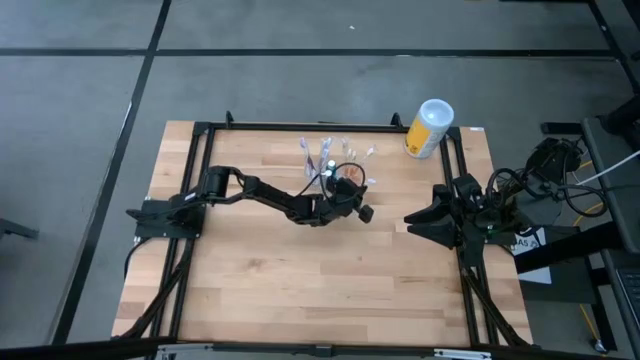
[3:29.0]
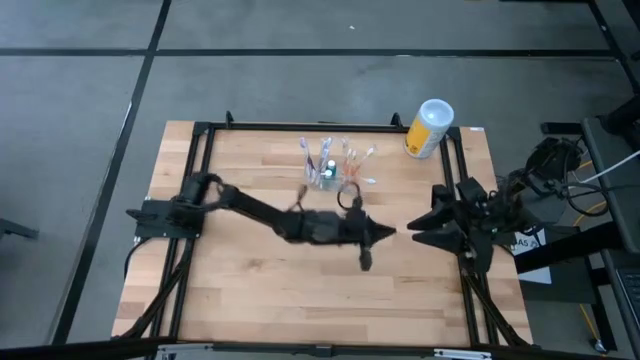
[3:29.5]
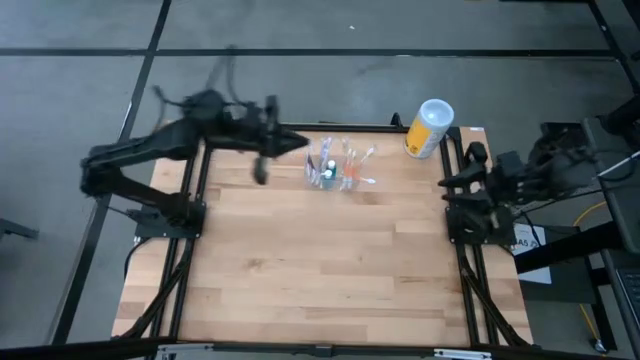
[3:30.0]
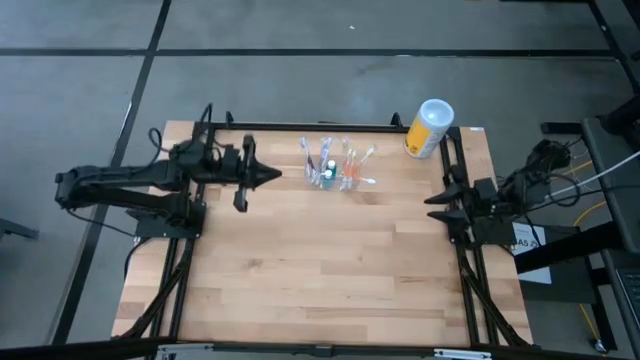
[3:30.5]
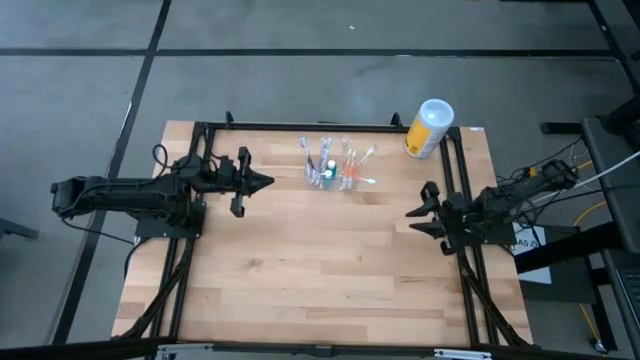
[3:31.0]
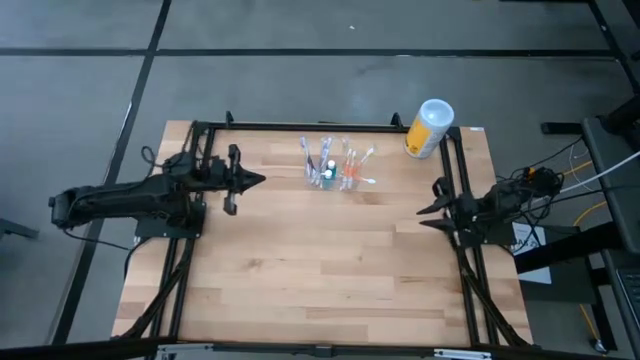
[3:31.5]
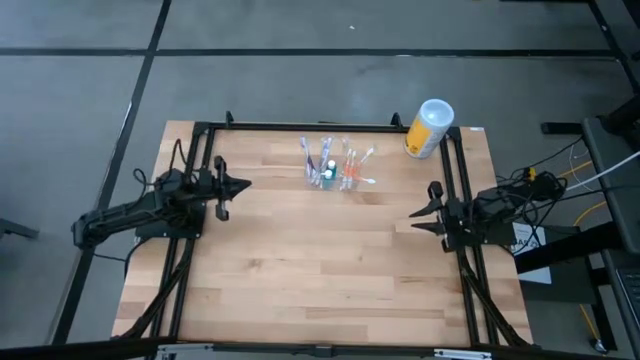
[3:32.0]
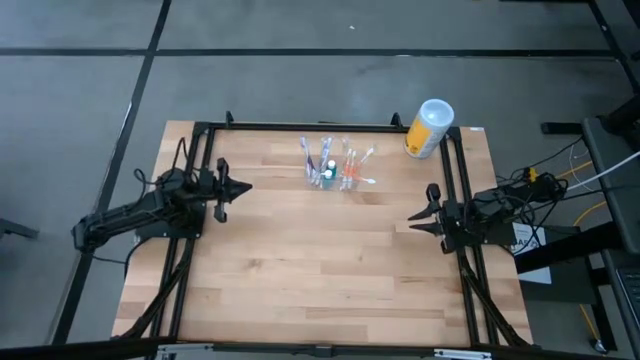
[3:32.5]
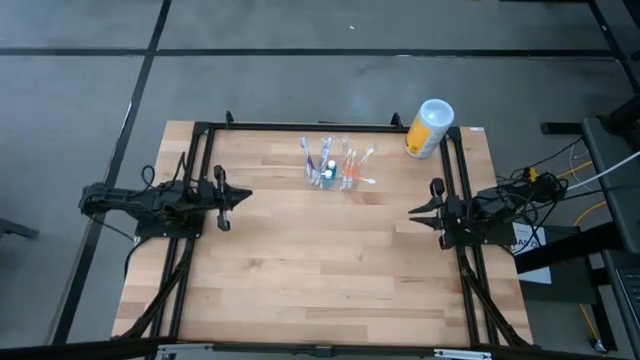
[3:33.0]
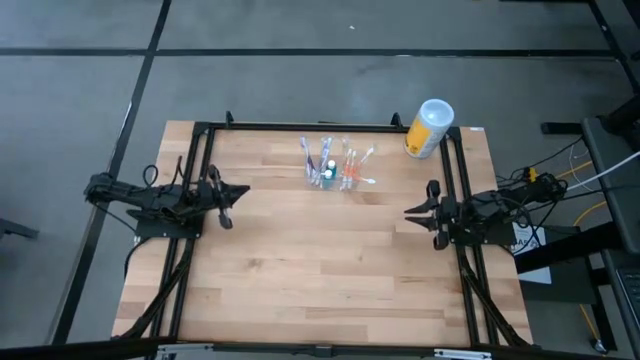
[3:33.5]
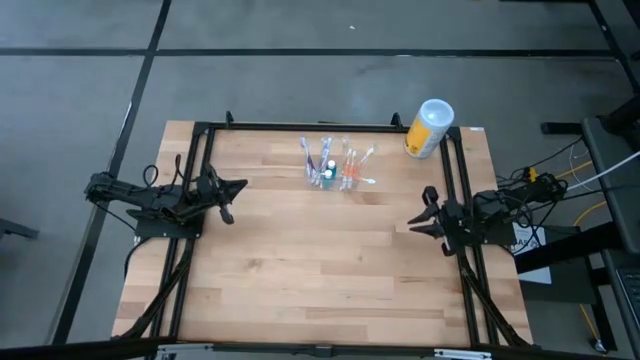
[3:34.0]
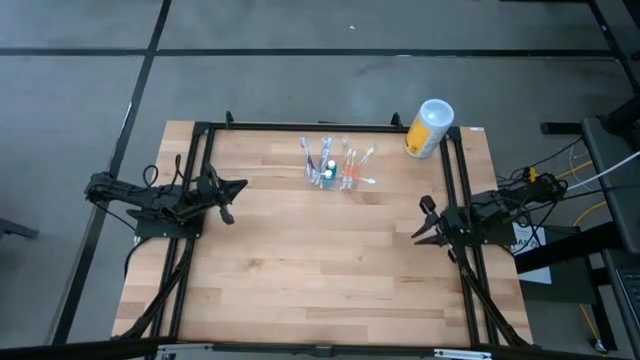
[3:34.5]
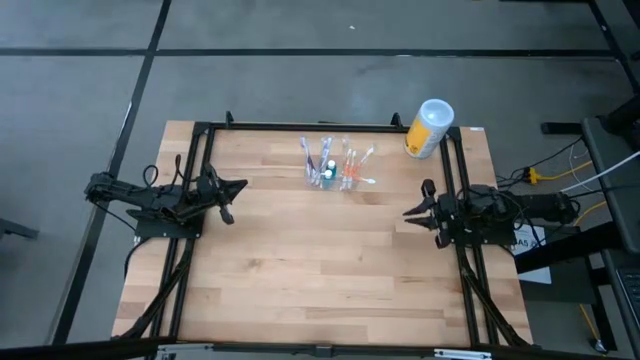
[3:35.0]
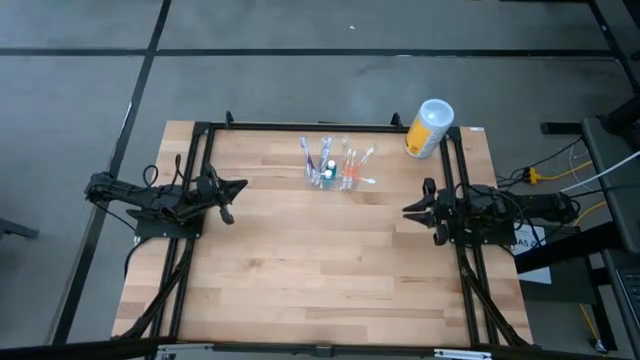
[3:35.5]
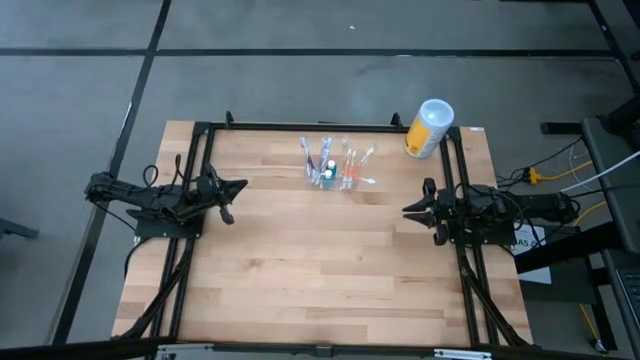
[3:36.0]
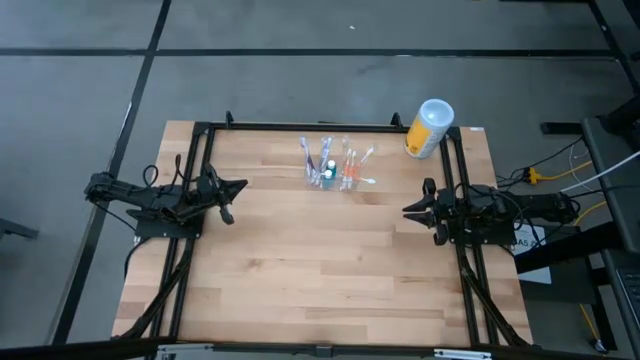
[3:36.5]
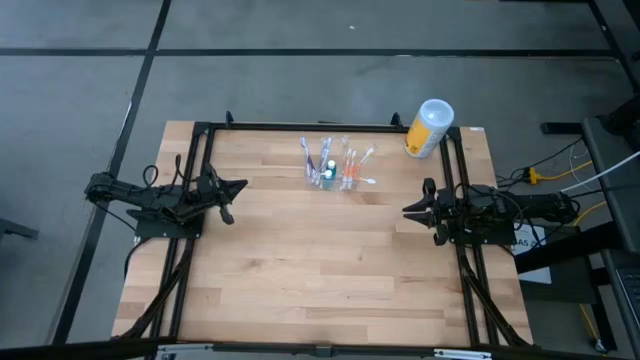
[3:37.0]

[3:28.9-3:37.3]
Task: Pick & Place toothbrushing station
Return to Home Position

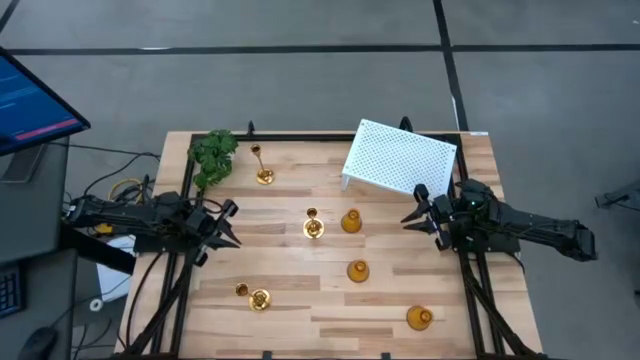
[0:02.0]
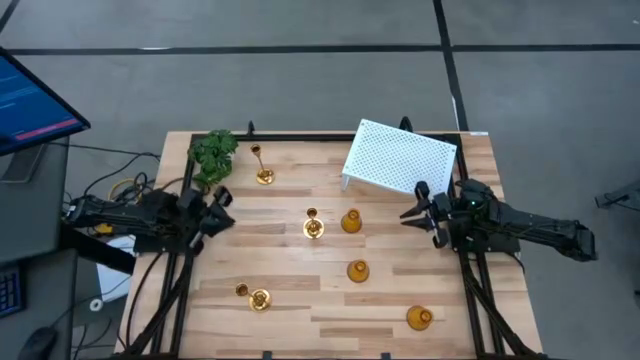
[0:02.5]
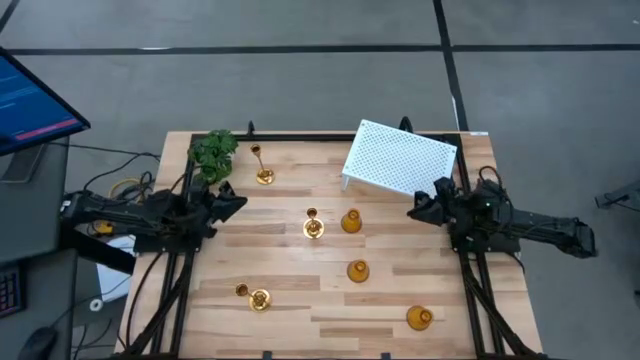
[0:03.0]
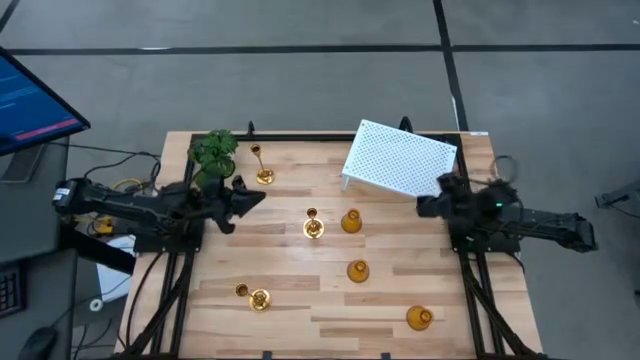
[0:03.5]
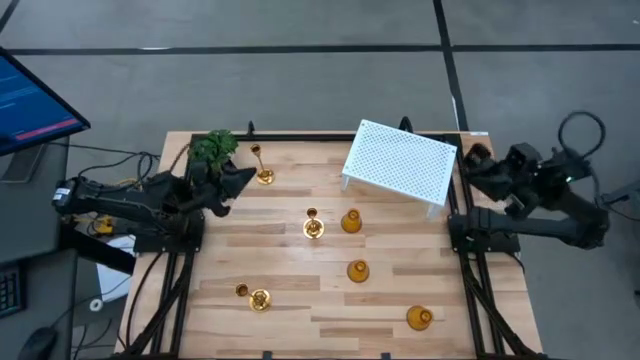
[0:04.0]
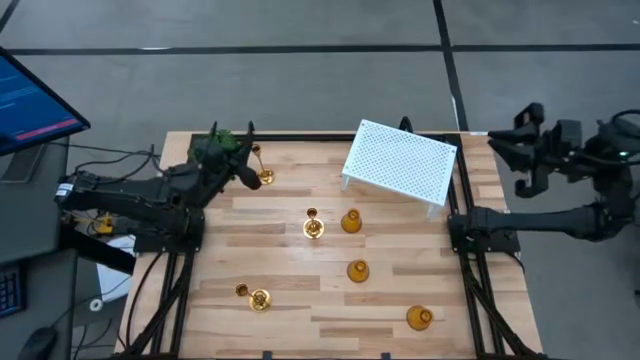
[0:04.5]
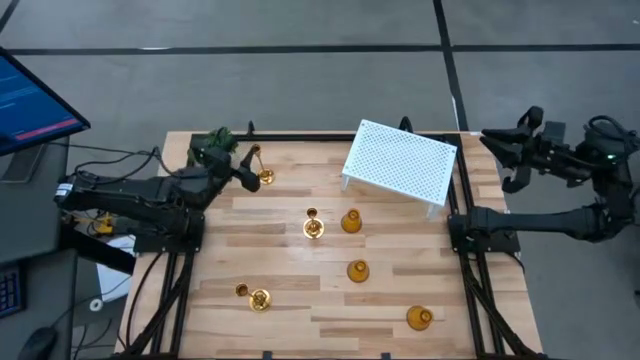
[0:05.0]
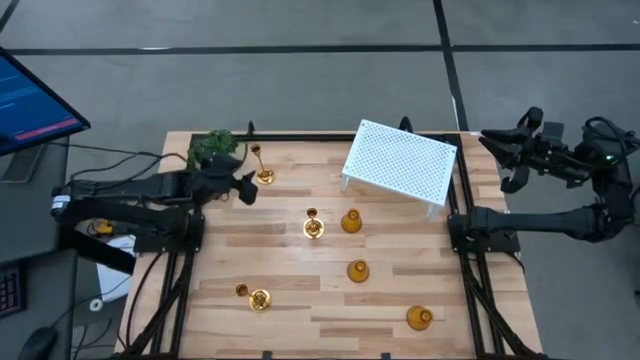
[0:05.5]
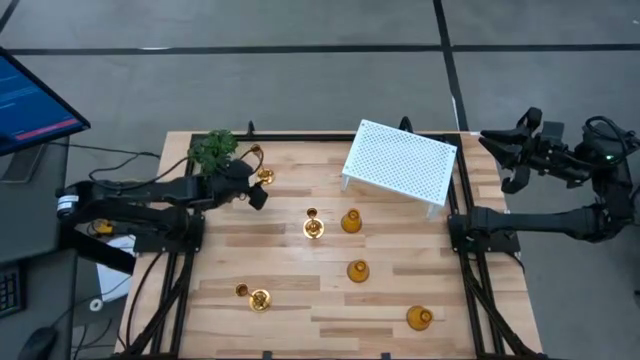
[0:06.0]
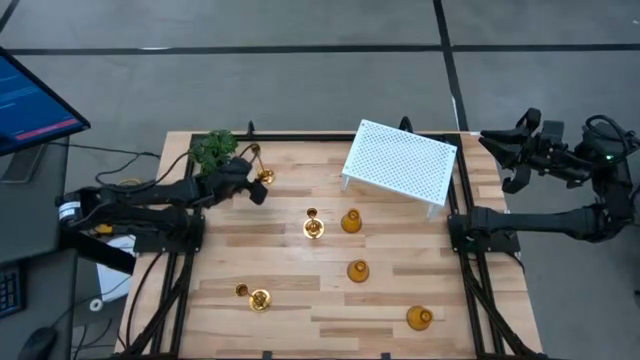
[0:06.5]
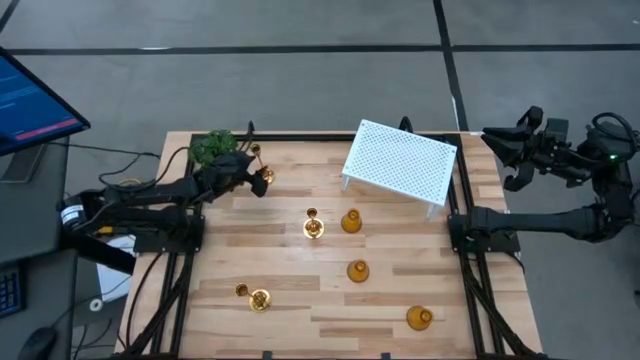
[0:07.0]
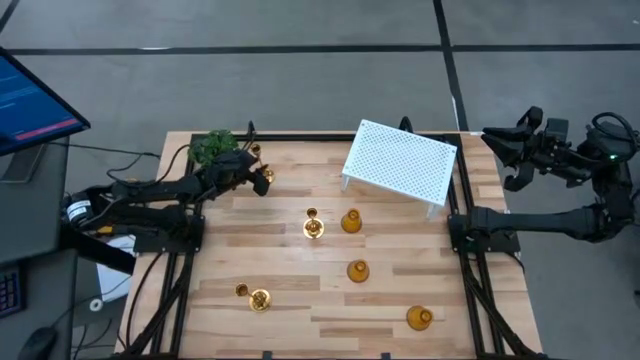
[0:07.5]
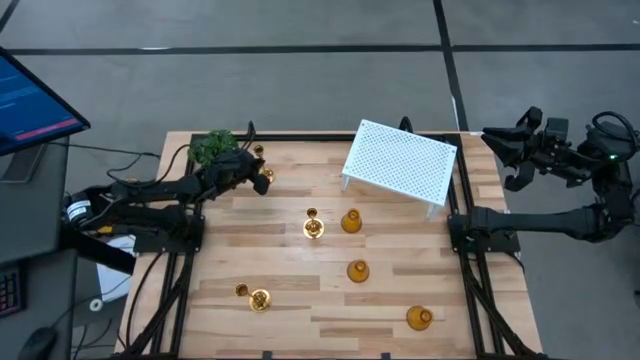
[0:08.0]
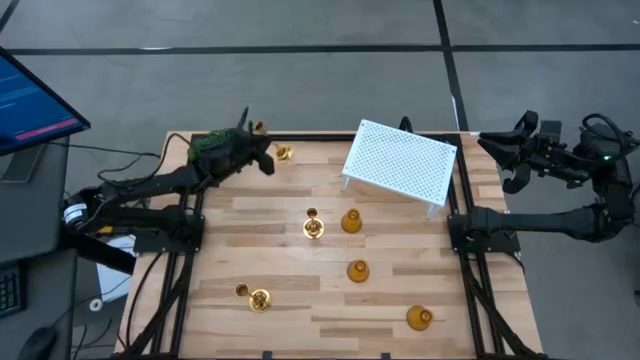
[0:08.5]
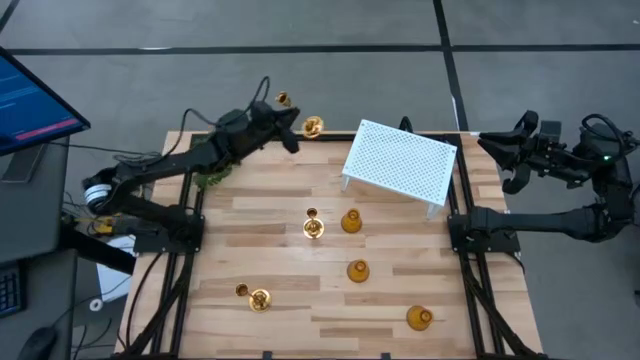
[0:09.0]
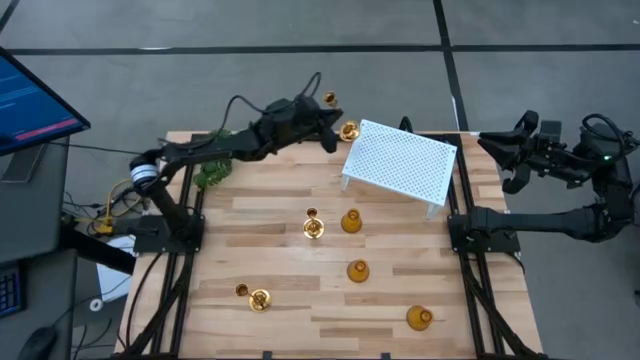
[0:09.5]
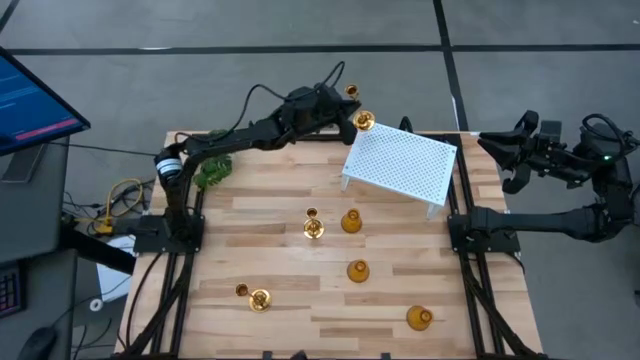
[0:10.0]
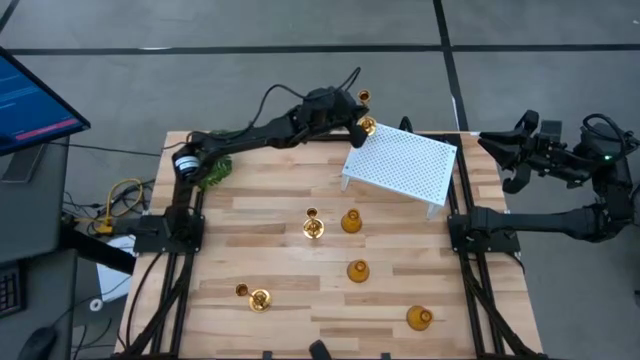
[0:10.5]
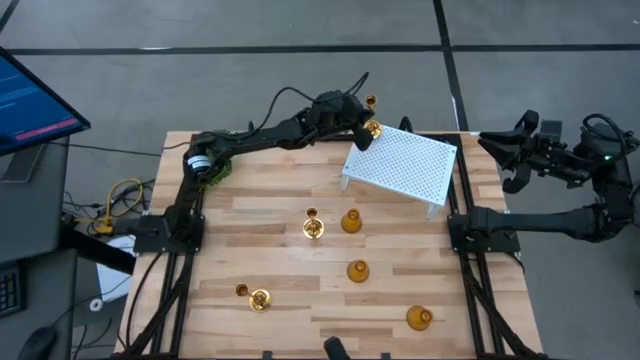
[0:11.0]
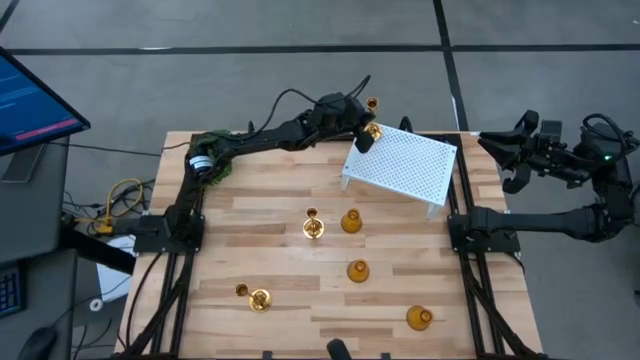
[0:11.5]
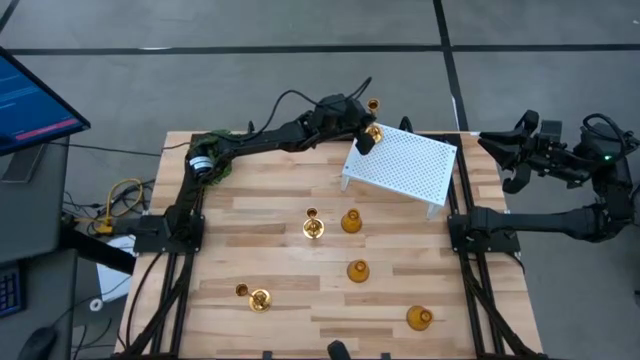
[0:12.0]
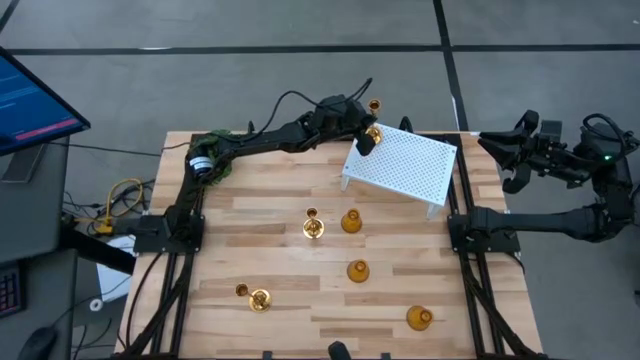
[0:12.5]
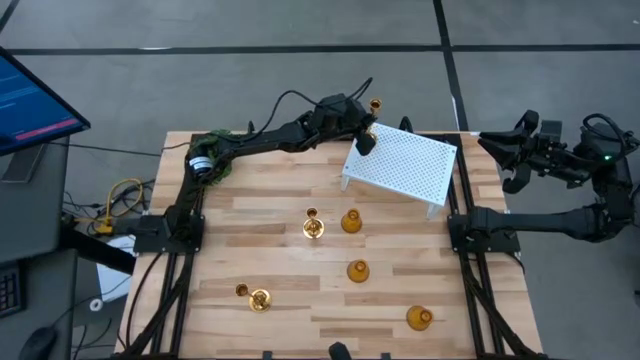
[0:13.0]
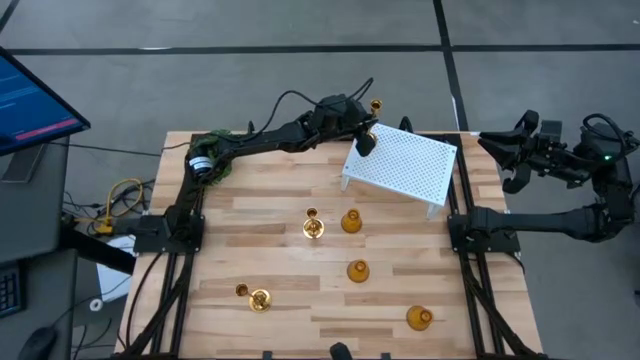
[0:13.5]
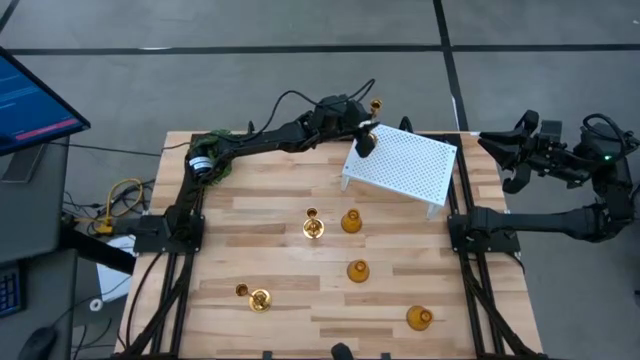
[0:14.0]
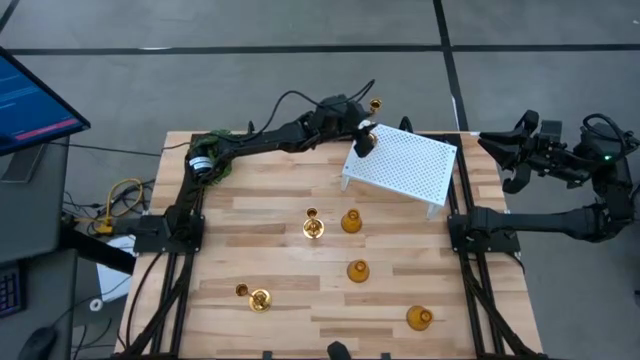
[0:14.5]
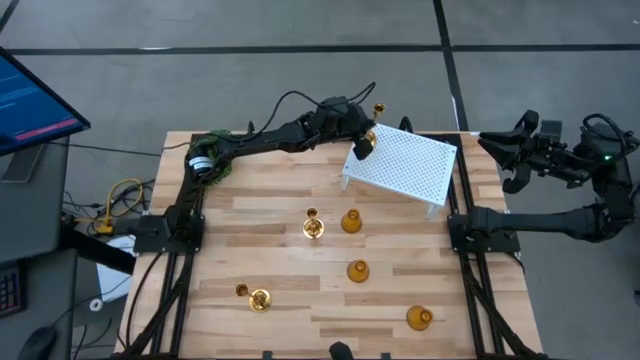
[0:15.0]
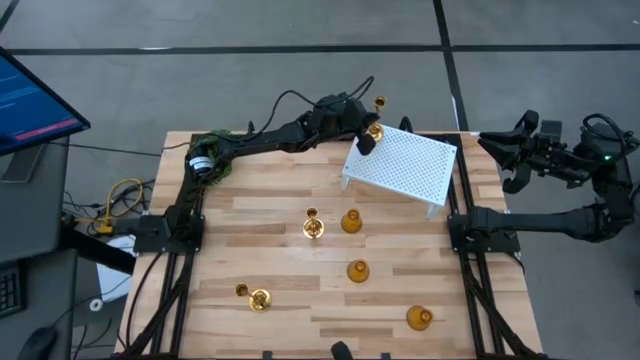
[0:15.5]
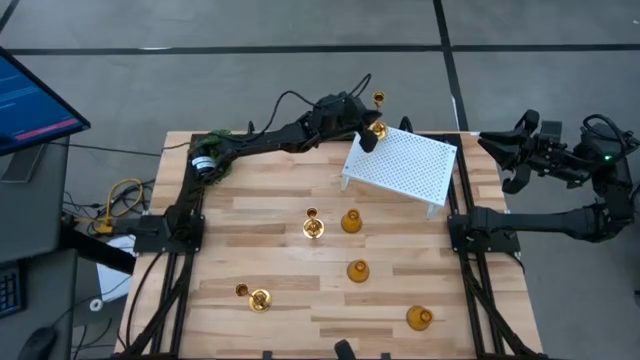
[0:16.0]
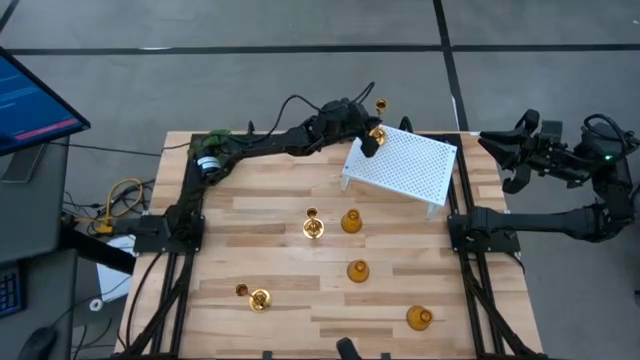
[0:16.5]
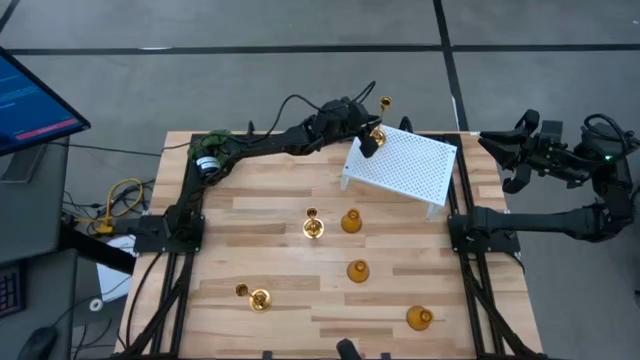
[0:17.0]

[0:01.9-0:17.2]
Task: Pick & Place candle stick holders
Put the top gold candle holder on the shelf
